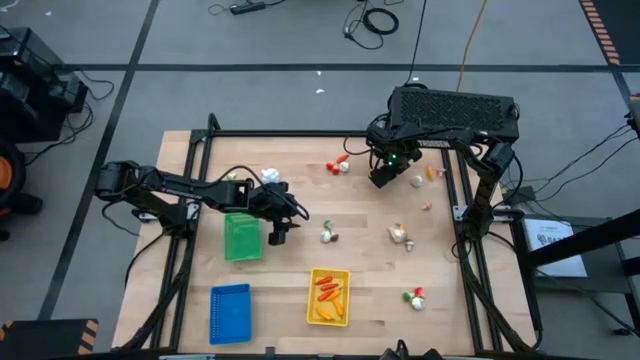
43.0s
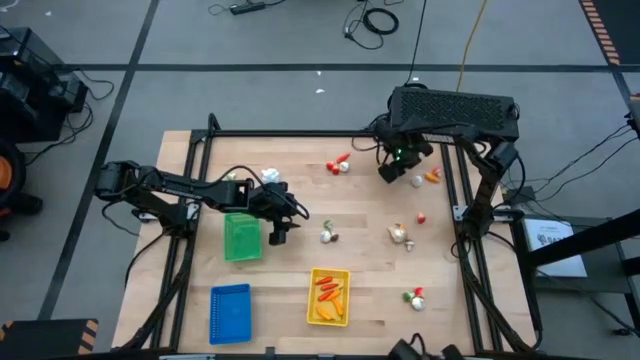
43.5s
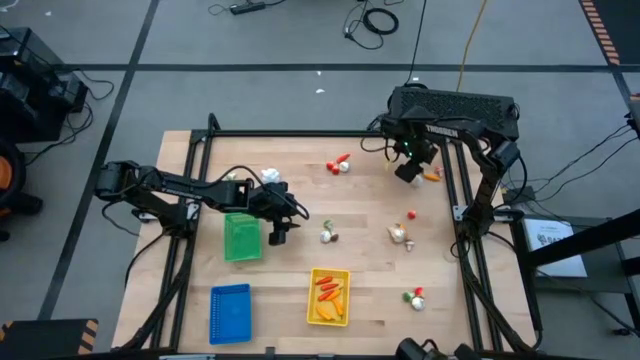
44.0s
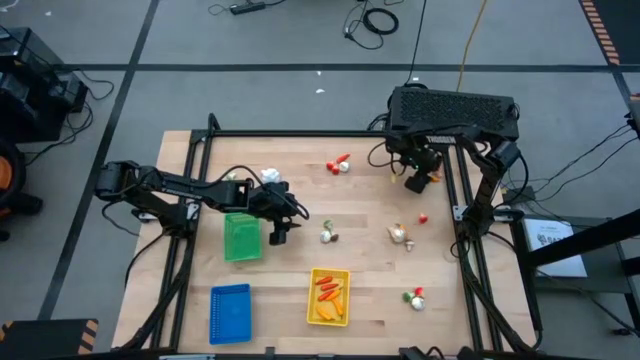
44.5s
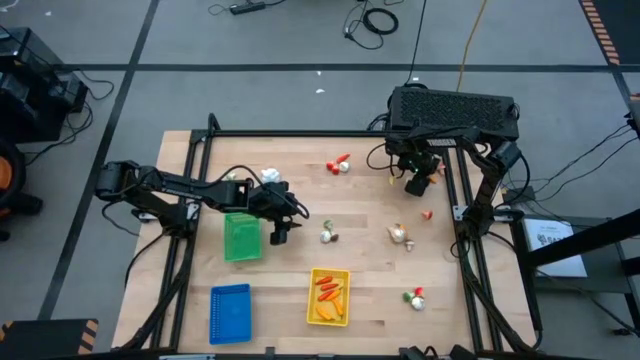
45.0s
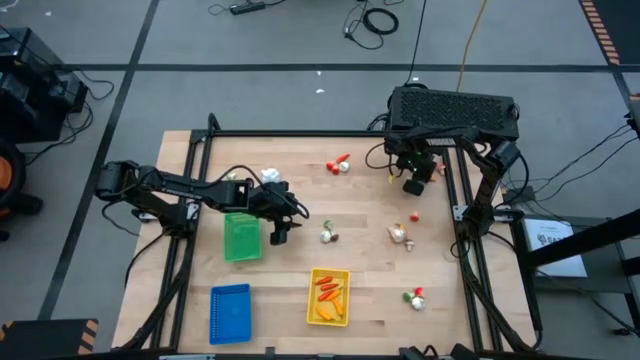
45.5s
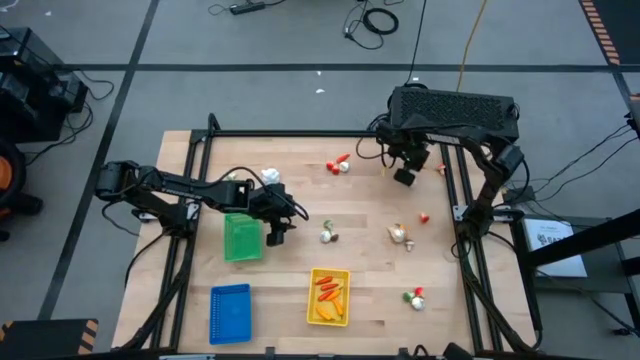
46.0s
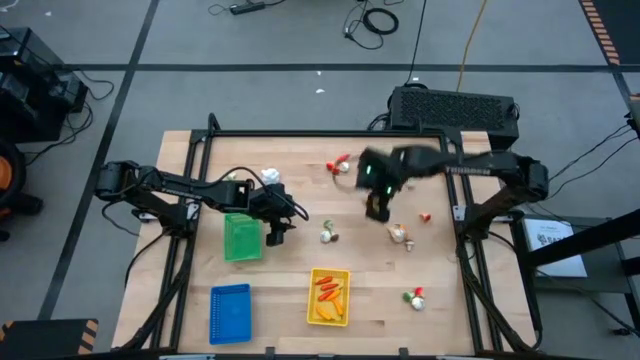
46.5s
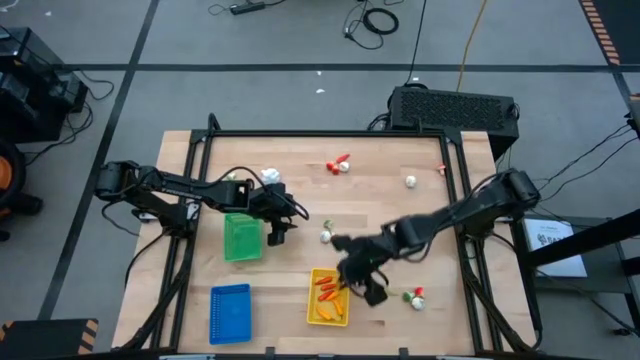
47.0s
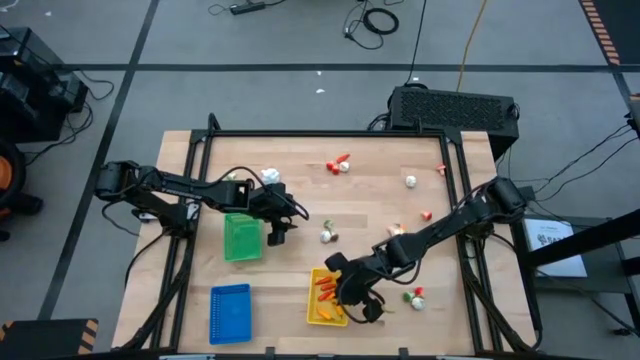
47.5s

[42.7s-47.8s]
Task: Sort produce into baskets
Put the yellow chili pepper into the yellow basket

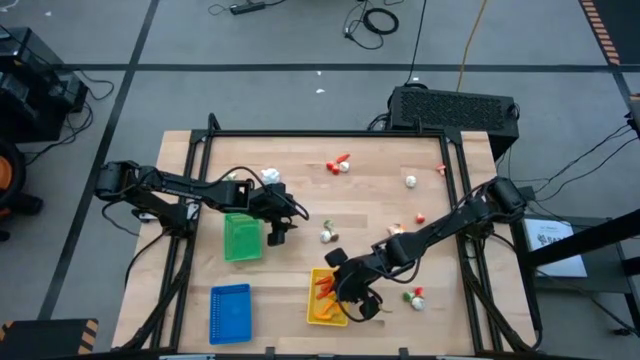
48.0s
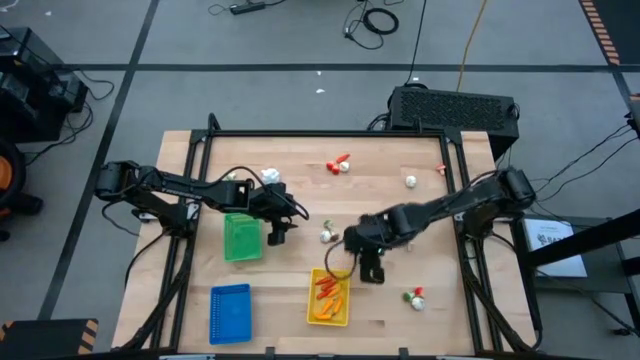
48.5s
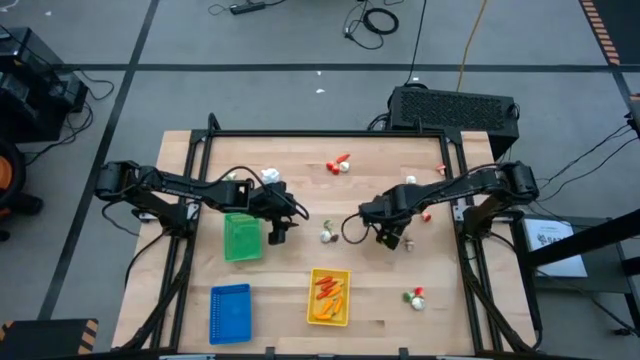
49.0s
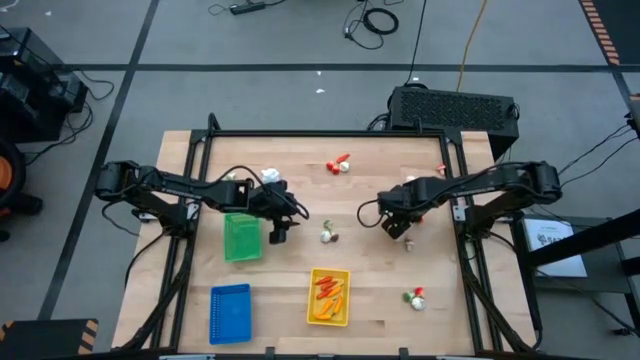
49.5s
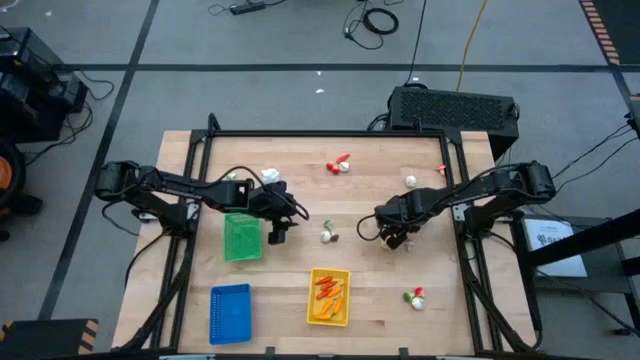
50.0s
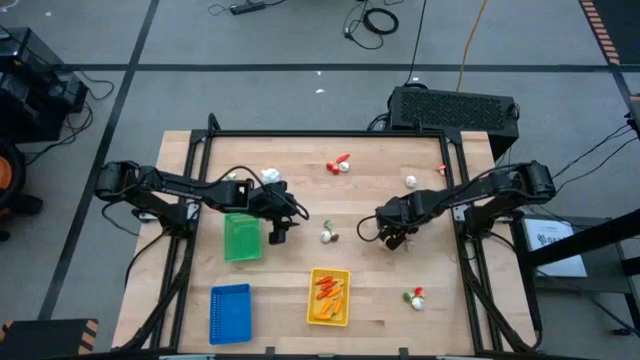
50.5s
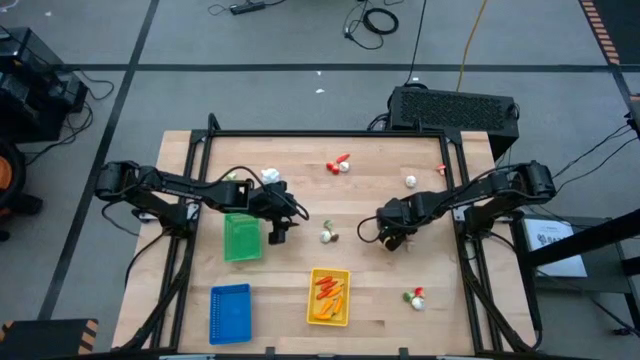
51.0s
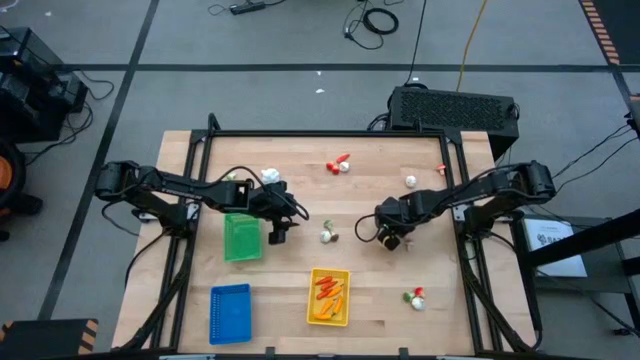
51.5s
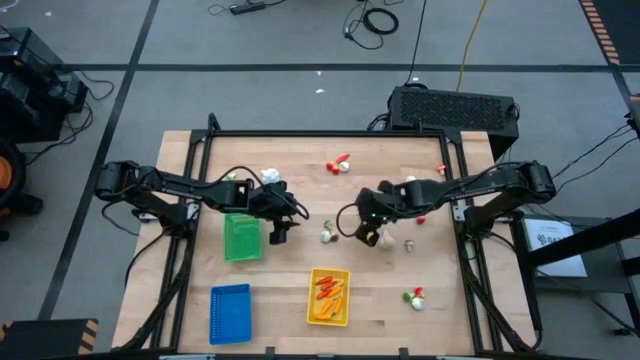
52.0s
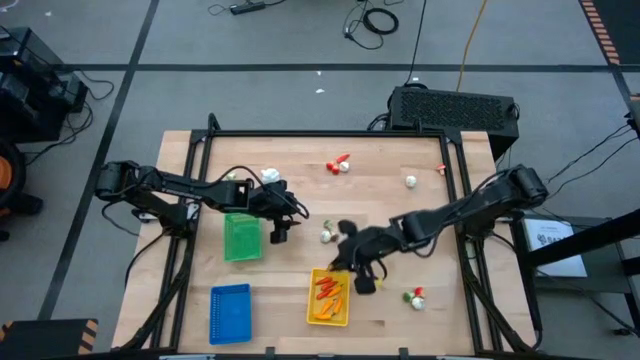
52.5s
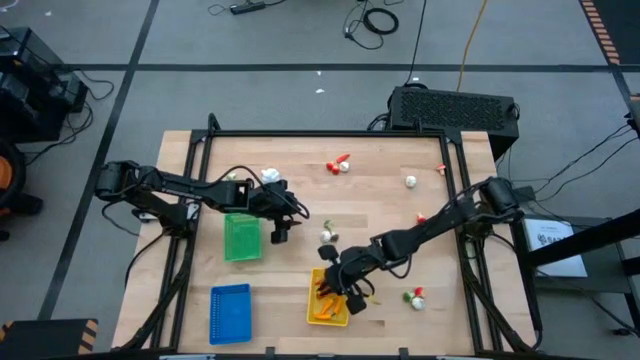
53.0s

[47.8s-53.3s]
Put the yellow chili pepper into the yellow basket

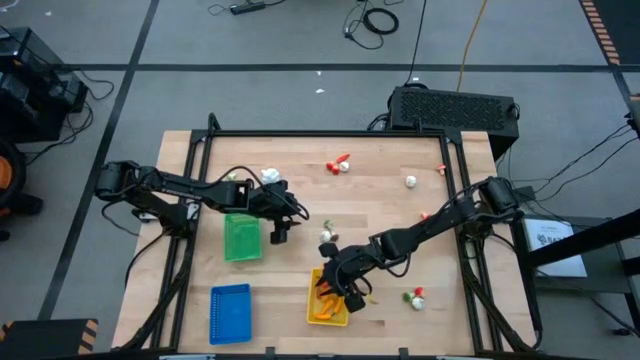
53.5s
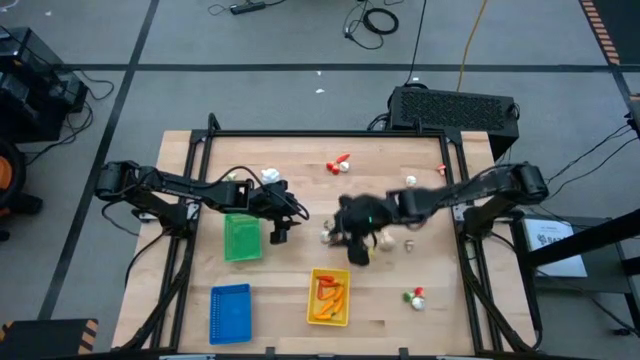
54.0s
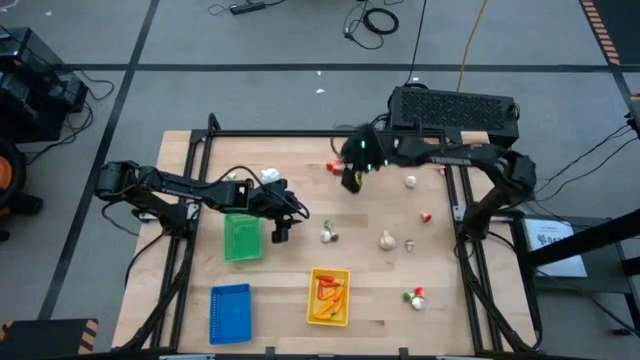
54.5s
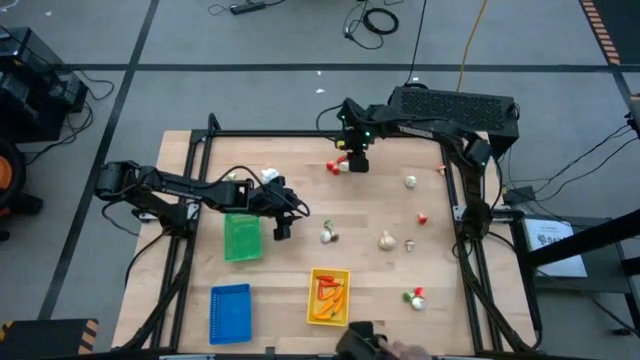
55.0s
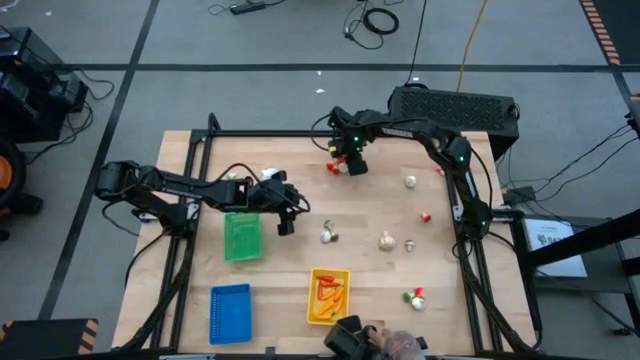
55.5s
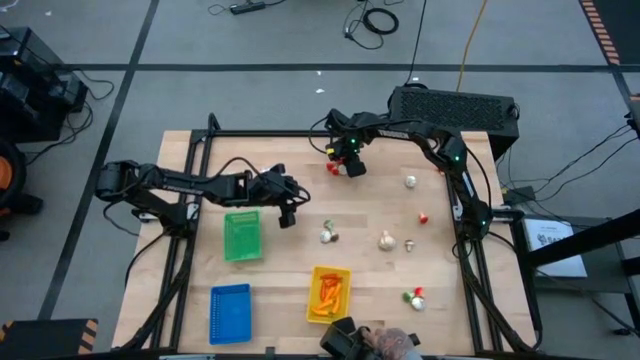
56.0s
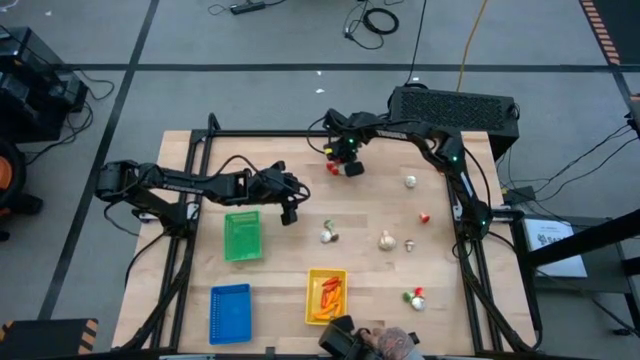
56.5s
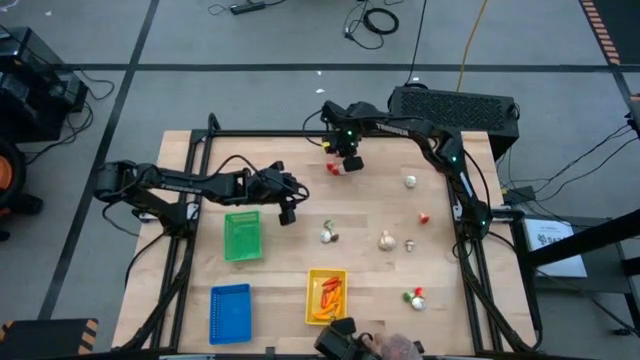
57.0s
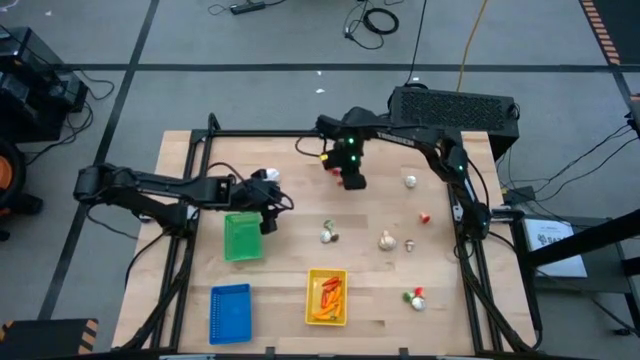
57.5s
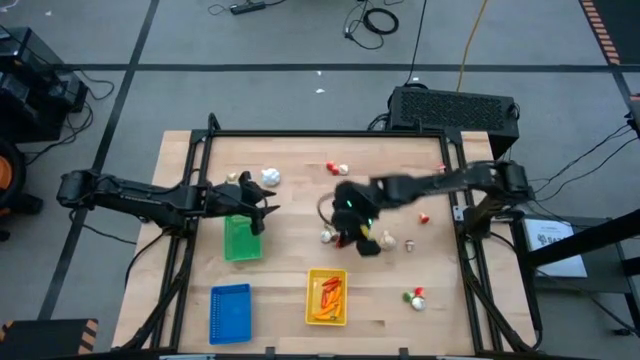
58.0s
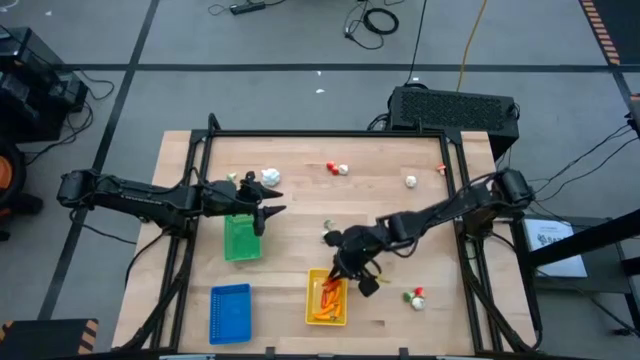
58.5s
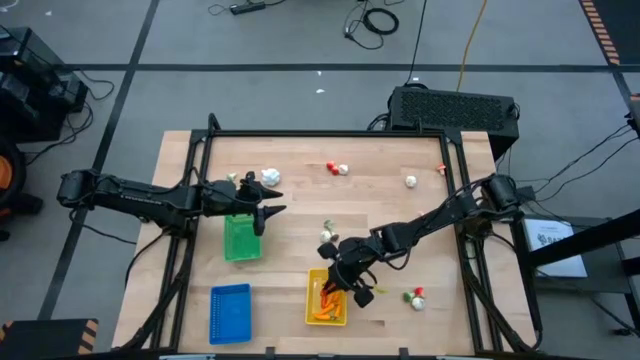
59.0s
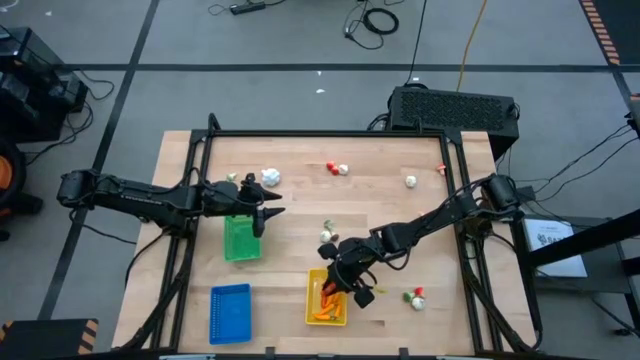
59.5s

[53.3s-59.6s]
Put the red chili pepper into the yellow basket

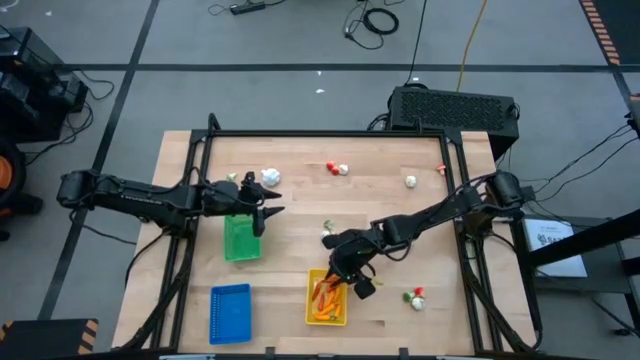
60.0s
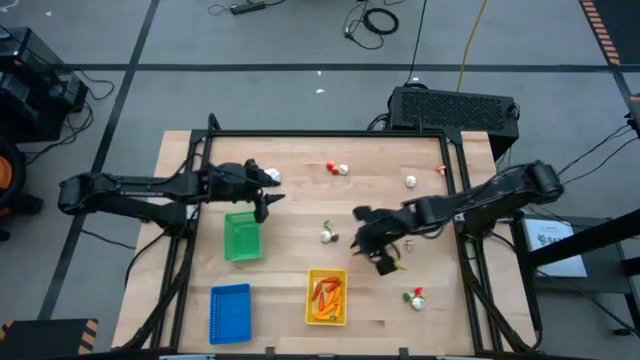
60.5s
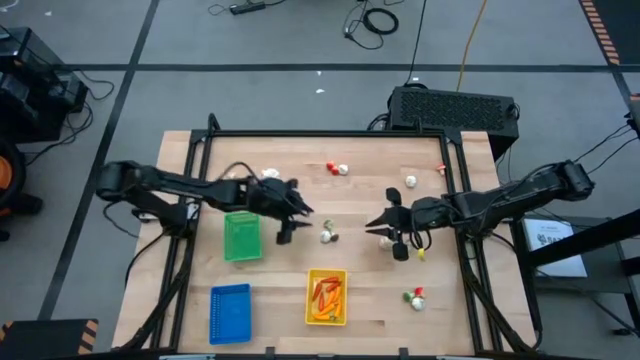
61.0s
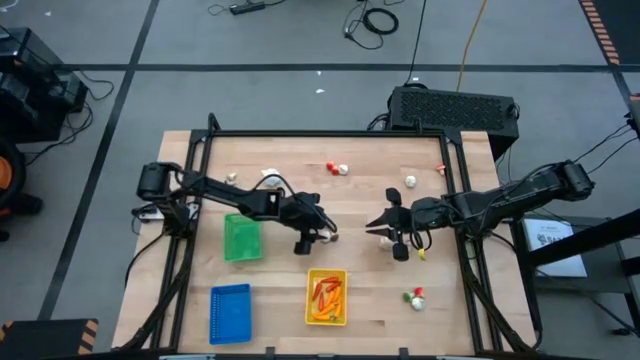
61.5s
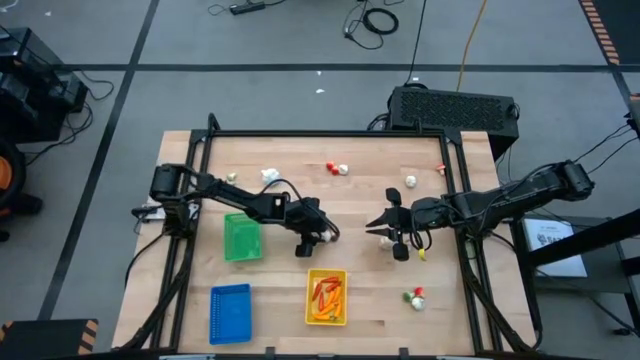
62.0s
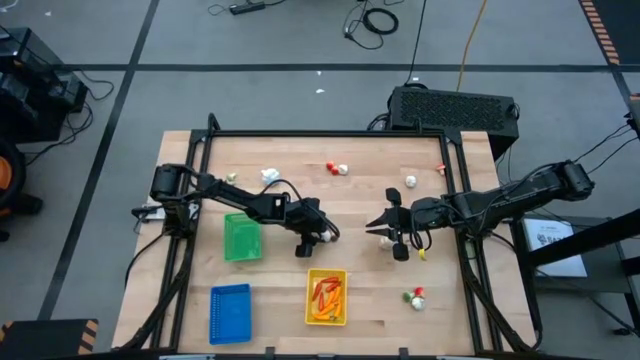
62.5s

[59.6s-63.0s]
Put the garlic into the green basket
